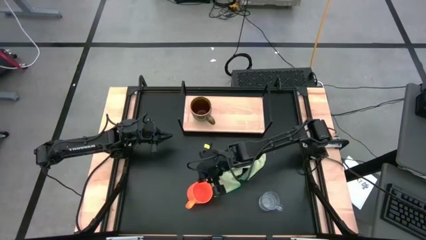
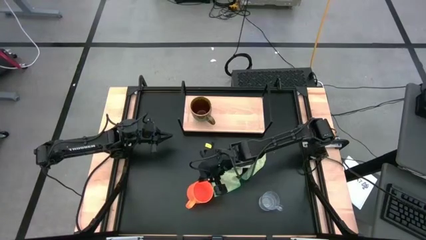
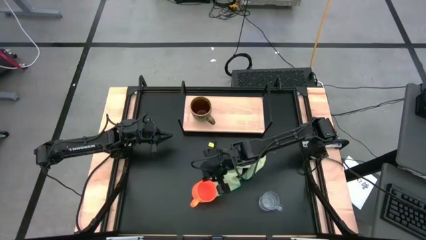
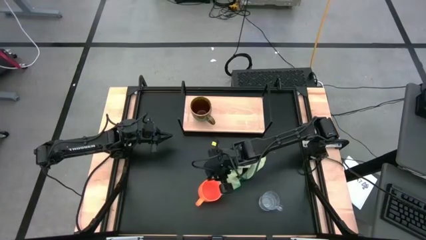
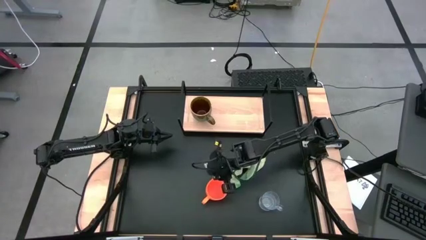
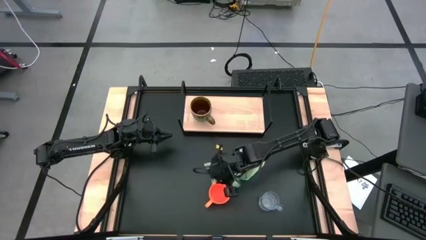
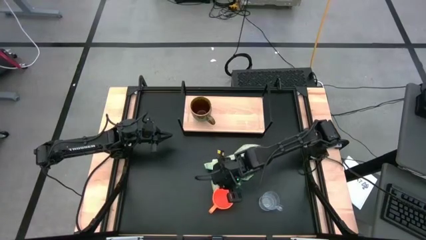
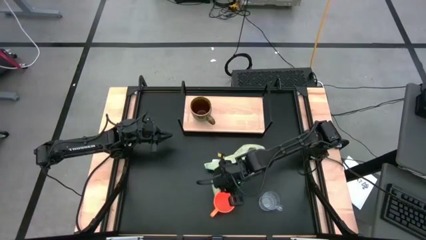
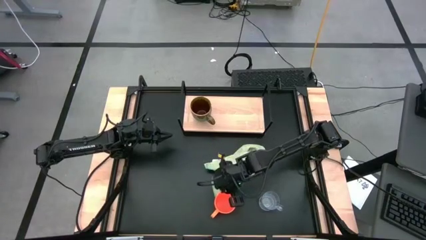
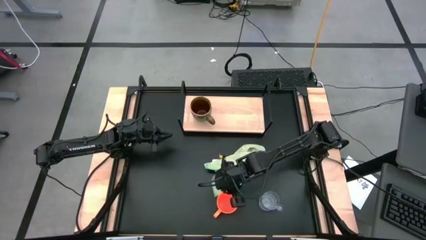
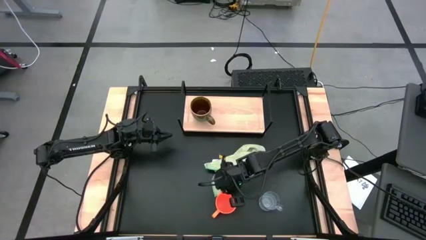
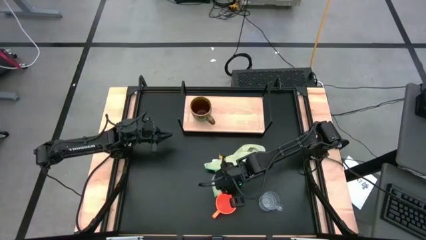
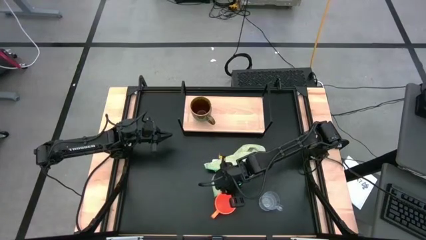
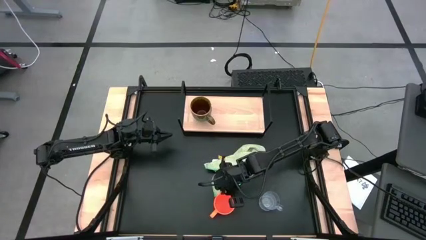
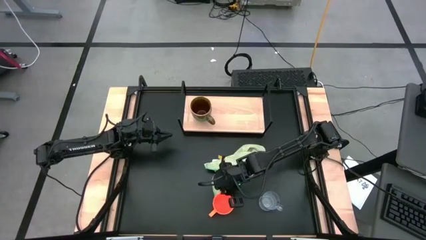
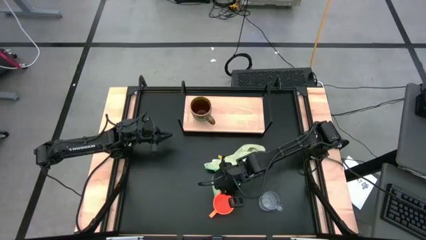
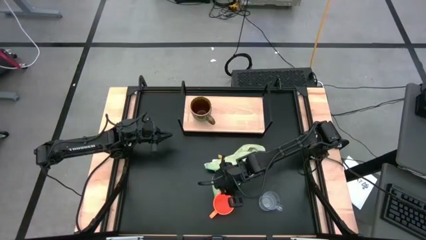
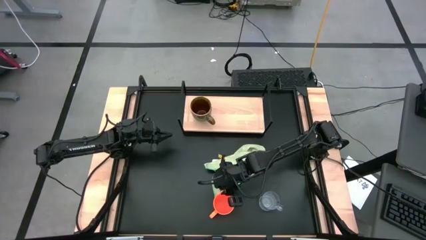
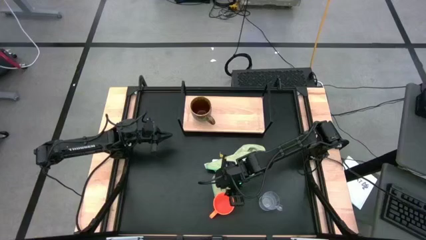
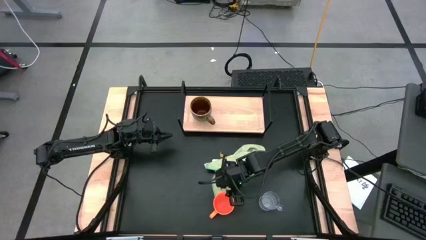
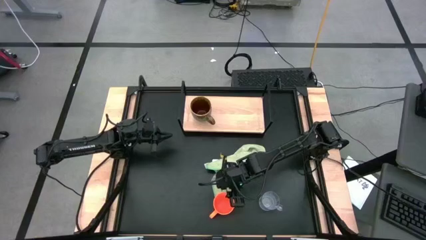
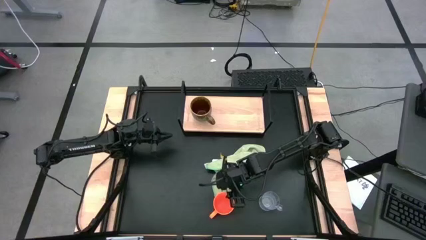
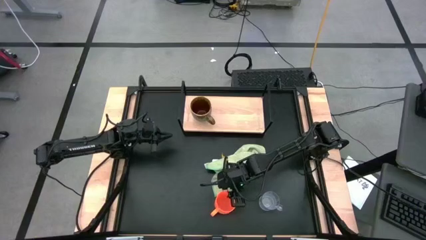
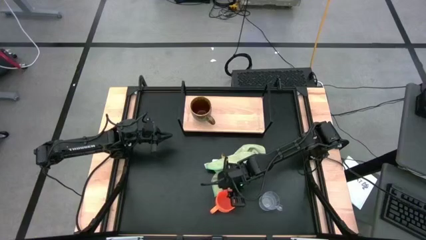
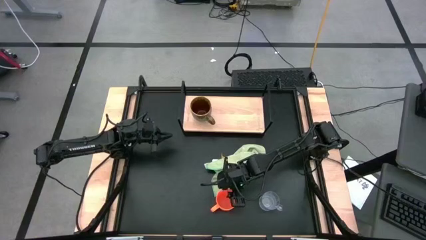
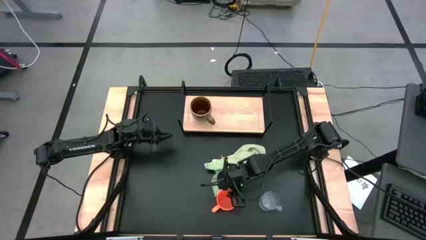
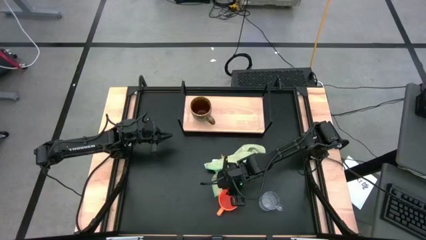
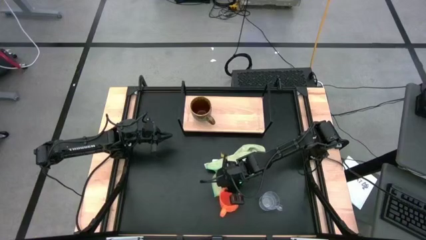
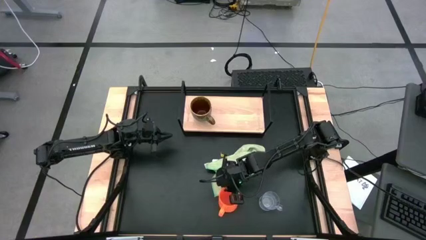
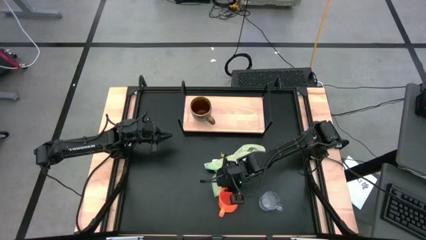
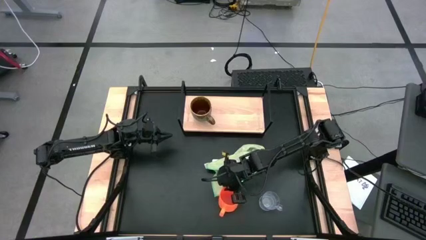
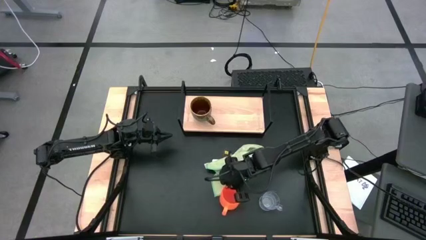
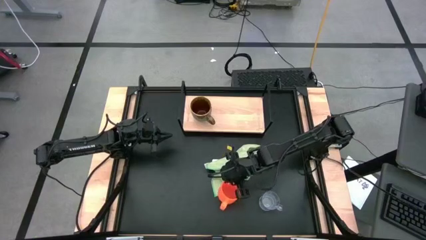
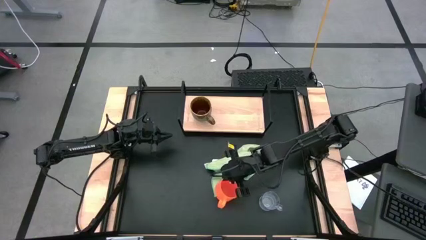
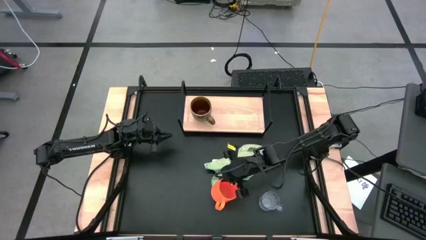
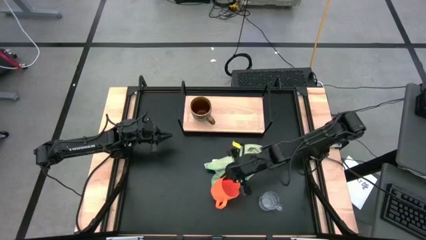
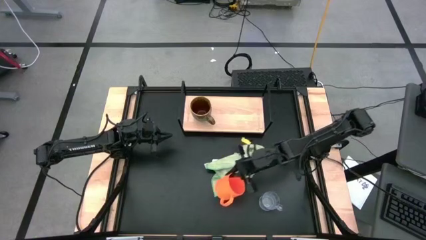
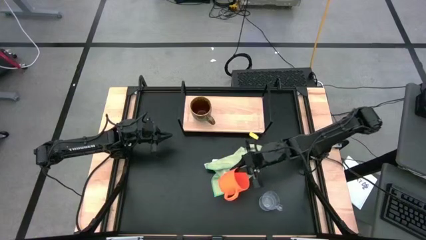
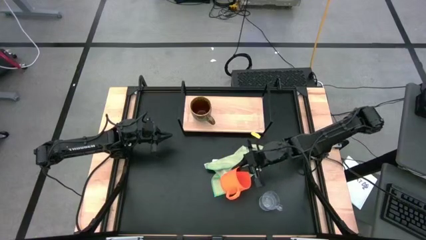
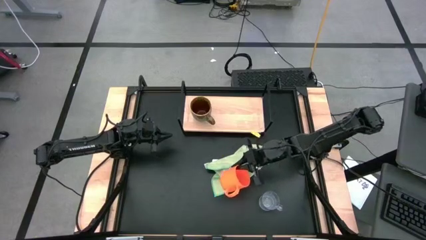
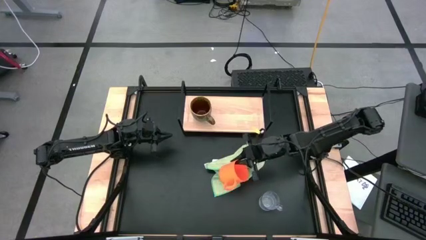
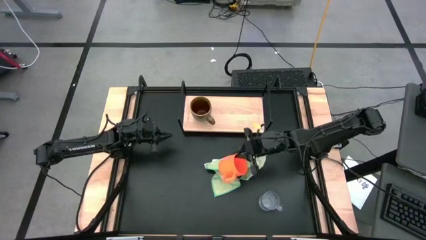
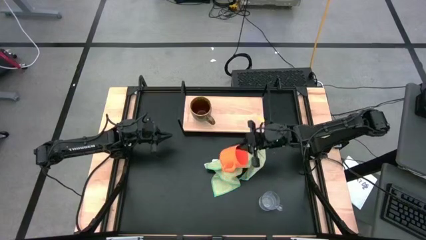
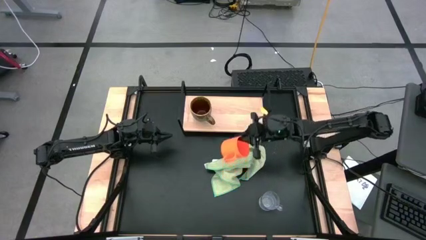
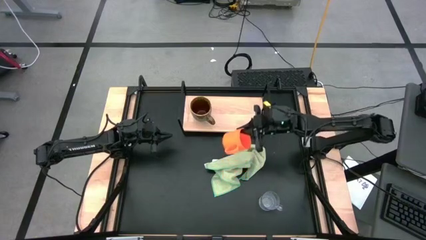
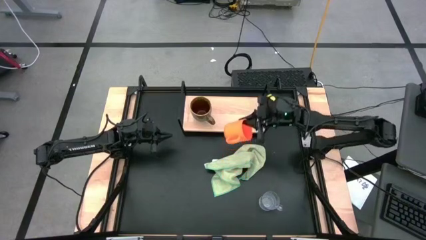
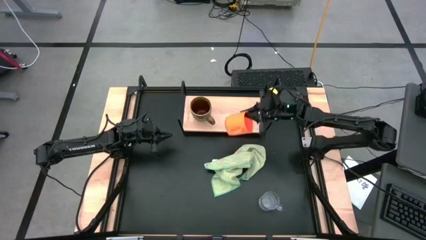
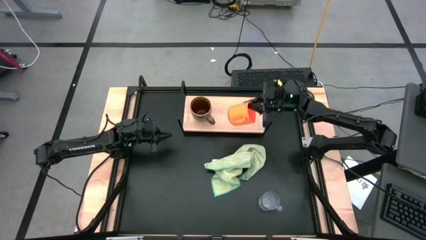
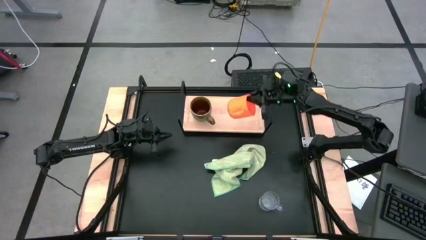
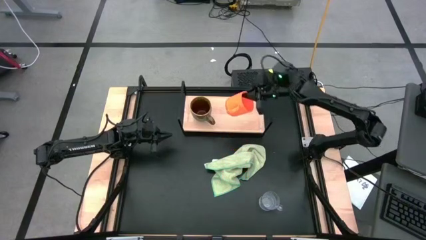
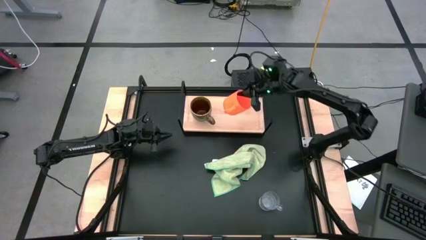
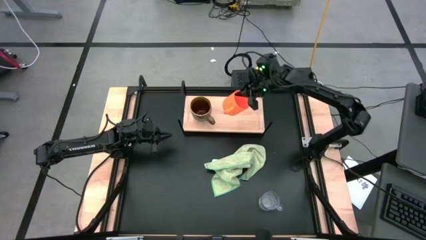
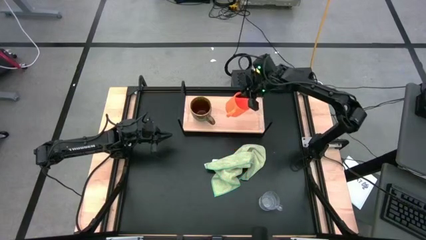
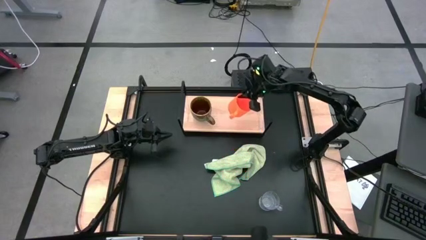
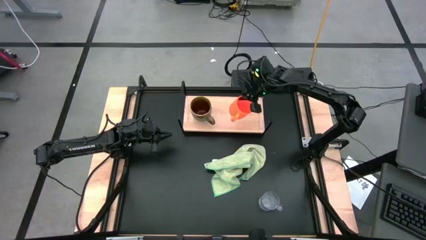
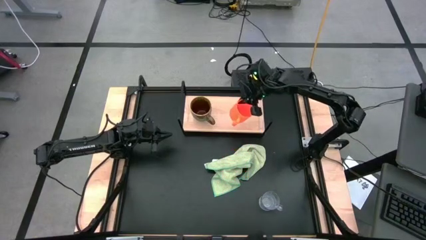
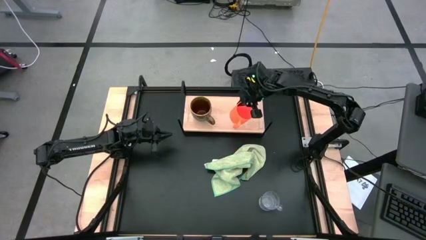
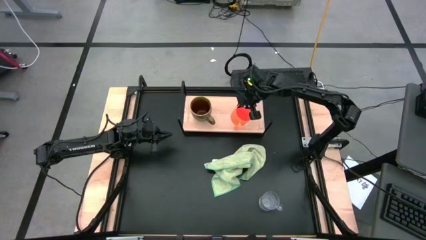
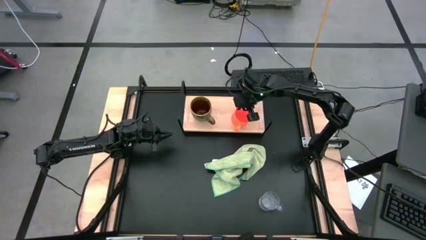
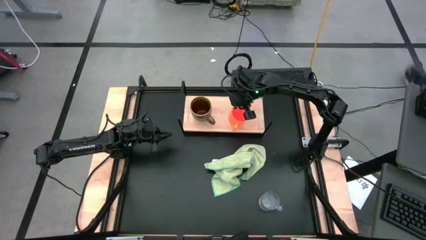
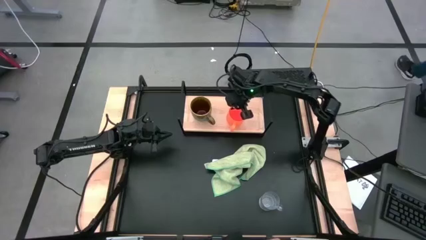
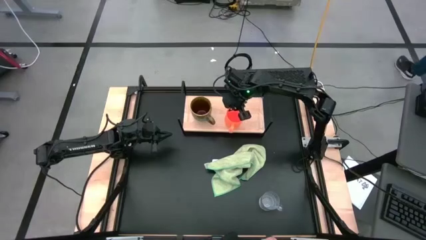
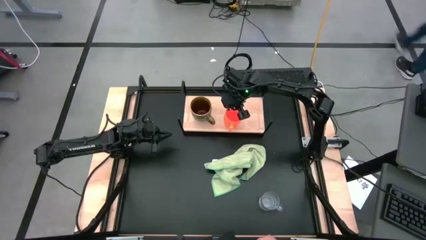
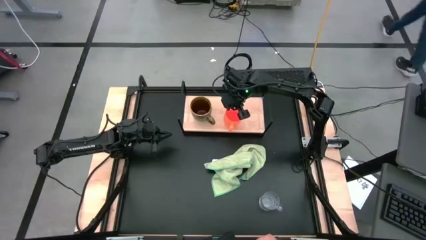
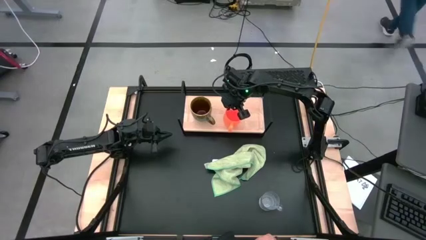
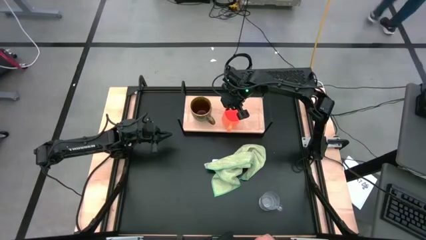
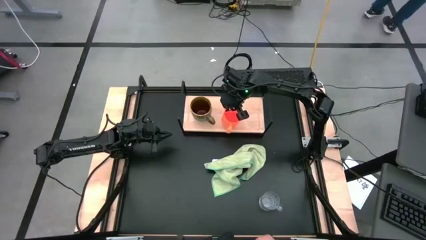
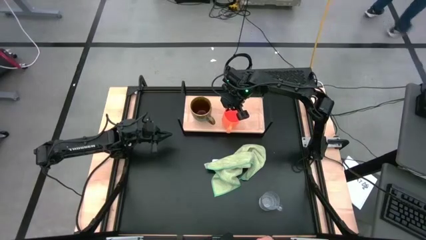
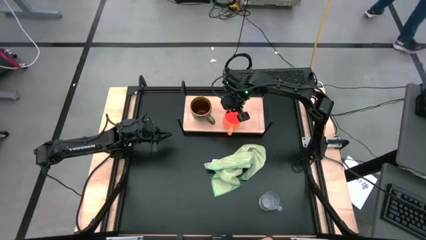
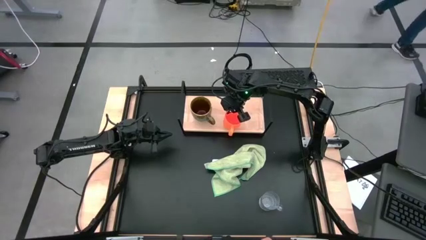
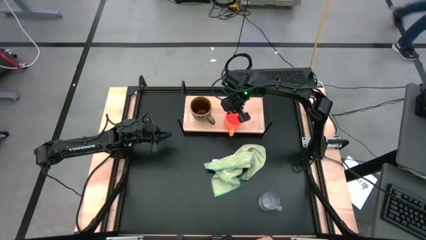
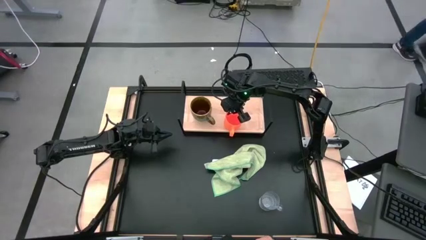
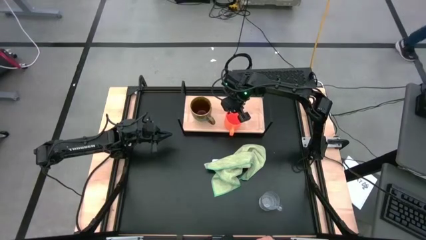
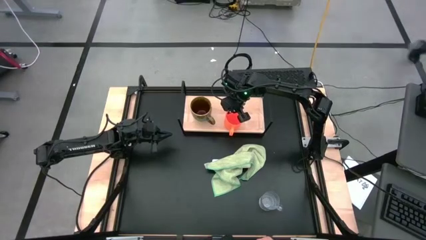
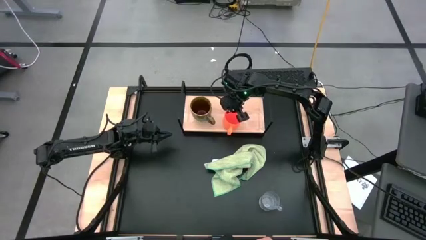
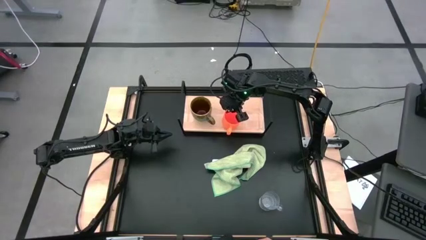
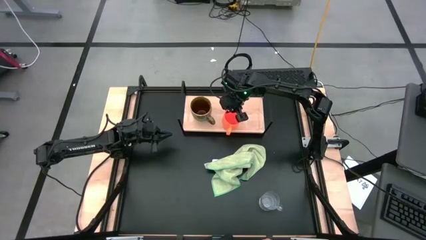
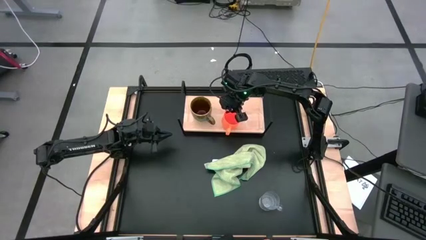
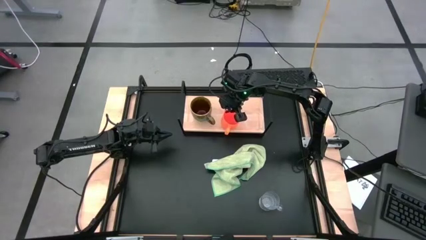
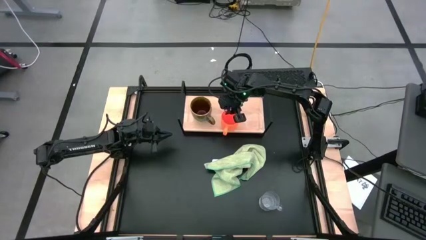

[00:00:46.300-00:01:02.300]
Task: Stack small to large cups/mugs on shelf
Put the orange mug on the shelf
